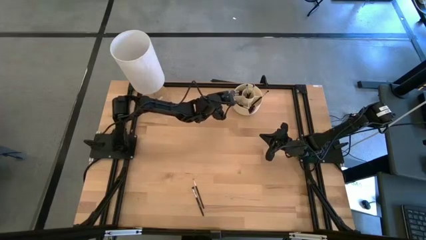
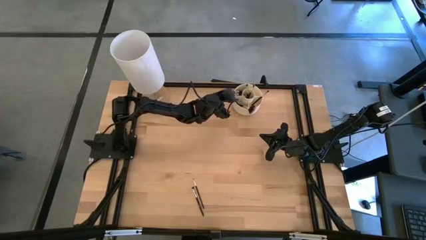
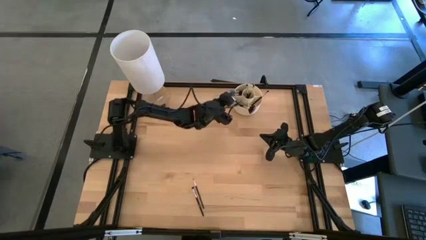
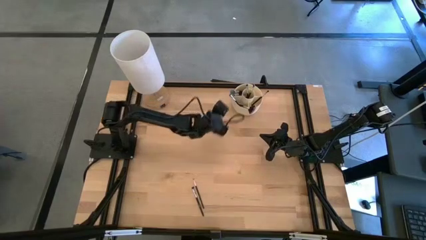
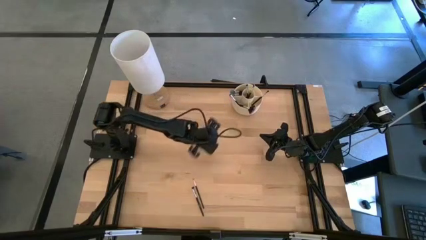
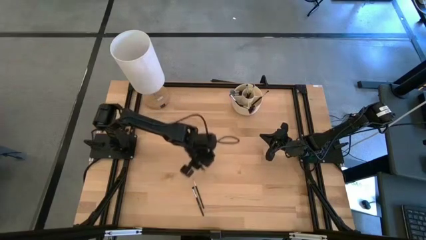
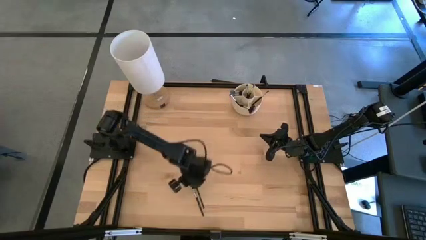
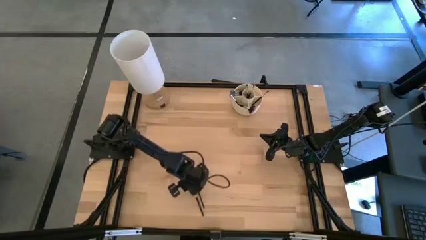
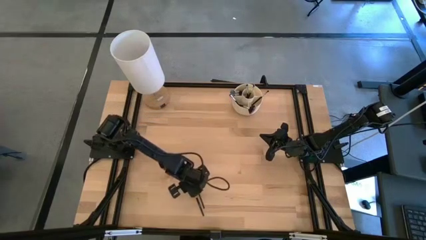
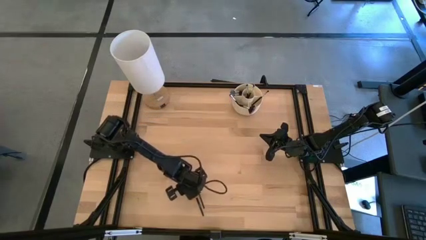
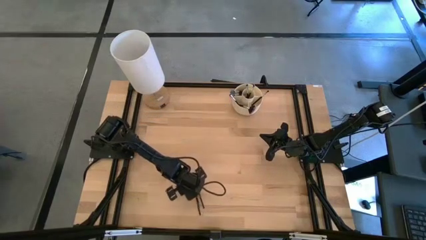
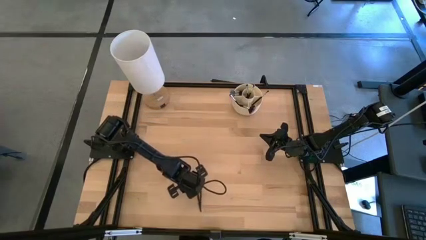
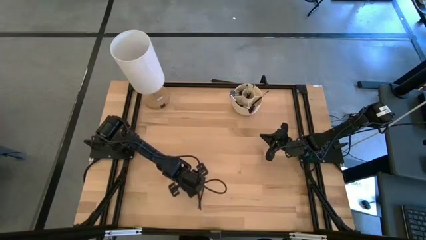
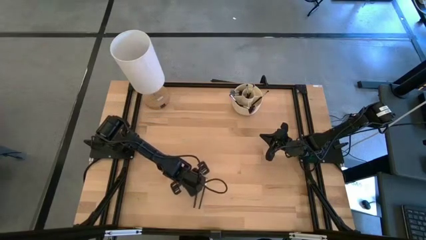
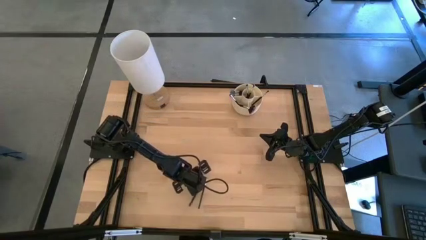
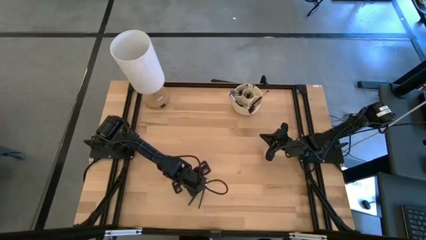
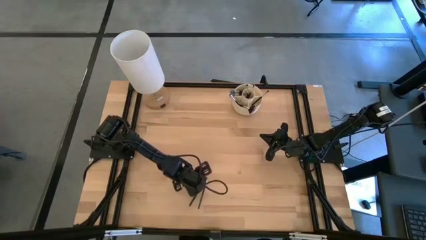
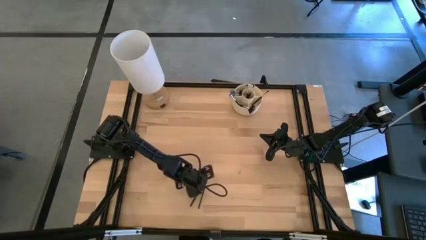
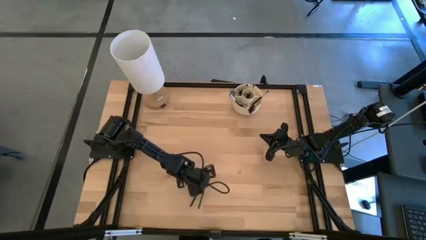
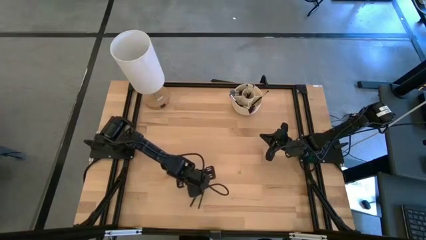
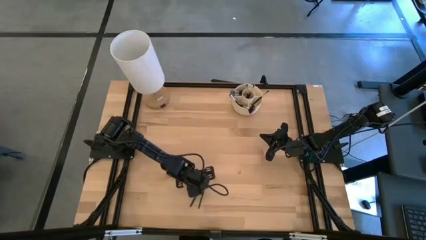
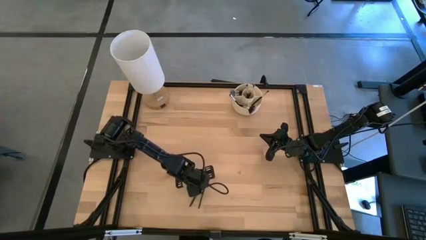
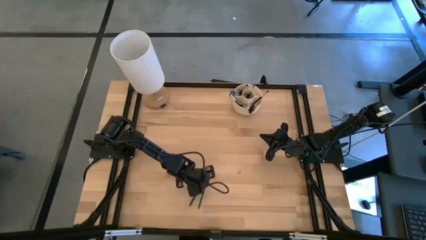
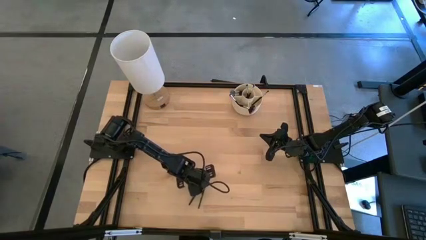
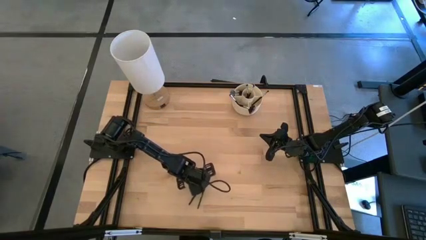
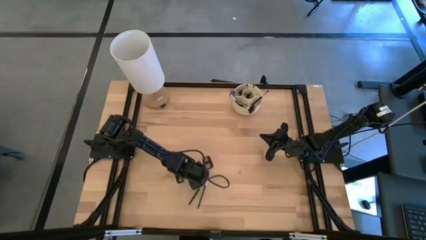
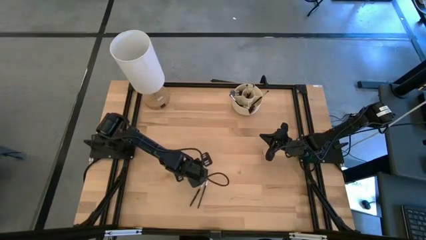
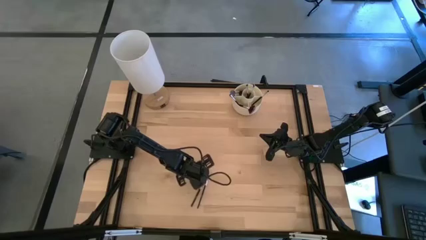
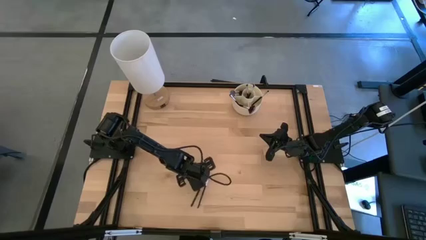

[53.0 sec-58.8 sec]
Task: Sort items
Put the blush brush into the pen organizer

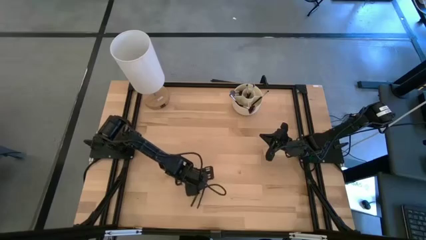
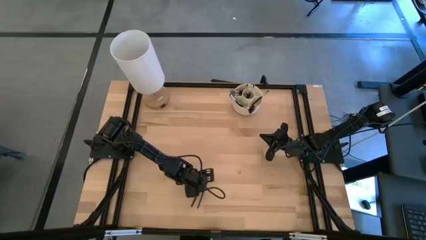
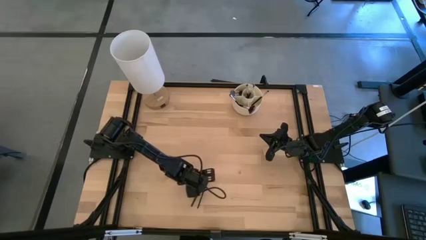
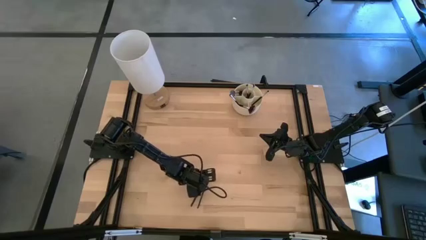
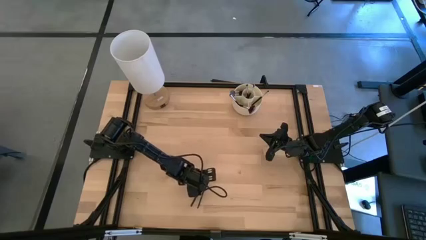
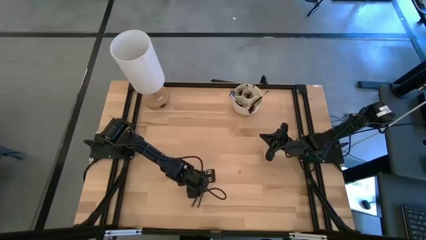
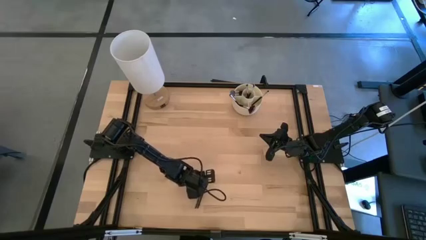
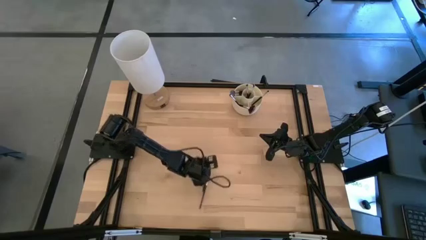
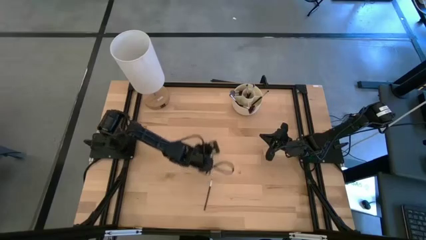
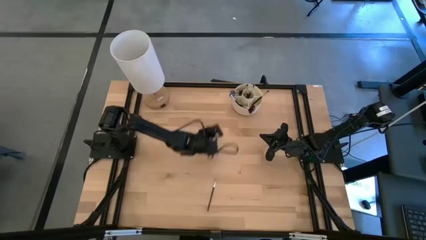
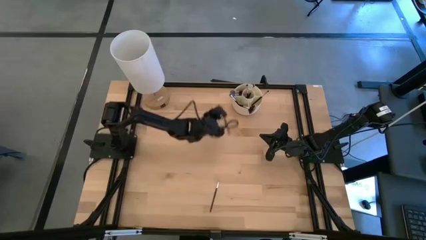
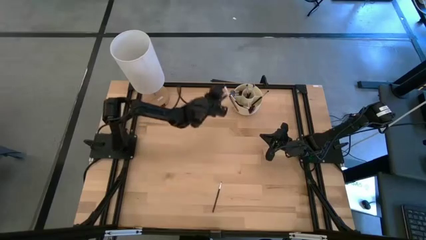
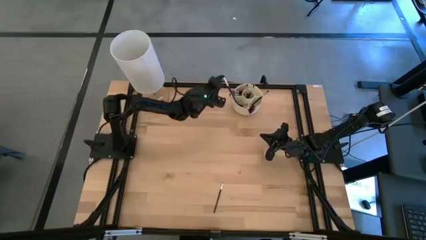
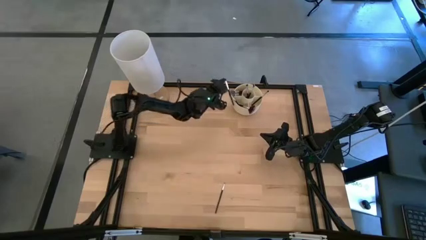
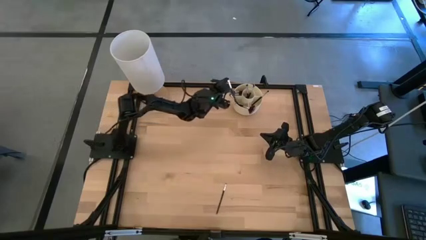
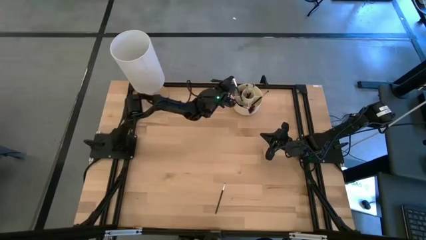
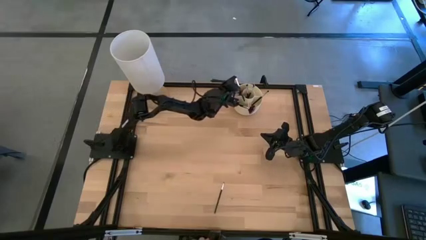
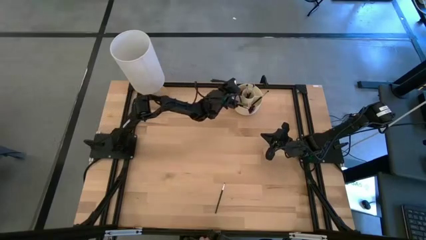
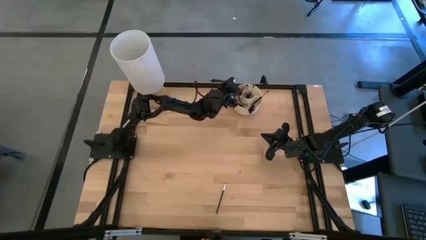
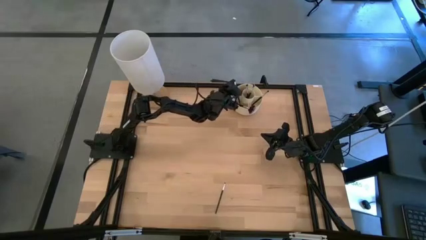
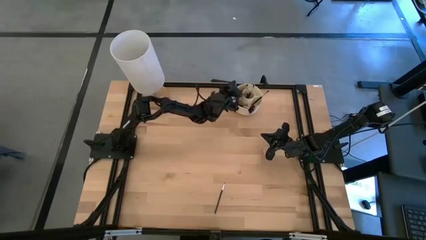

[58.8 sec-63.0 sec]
Put the blush brush into the pen organizer

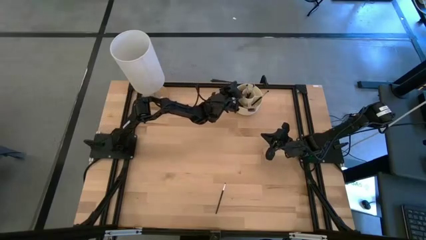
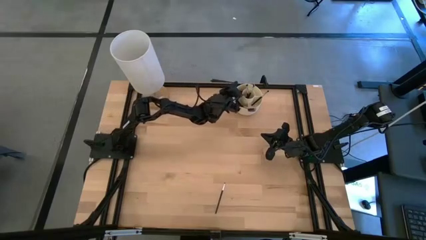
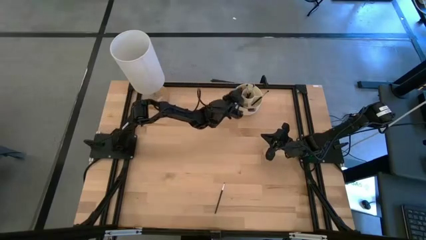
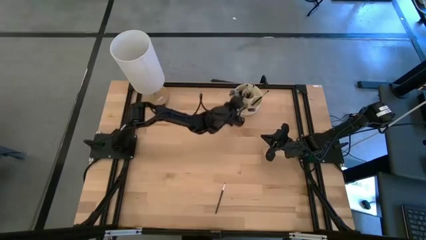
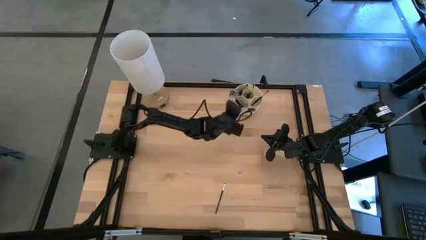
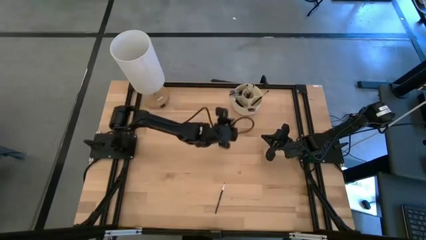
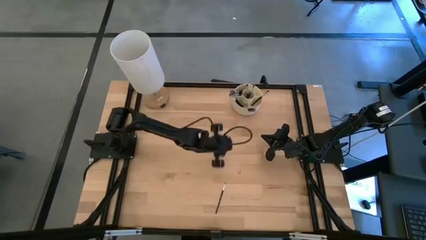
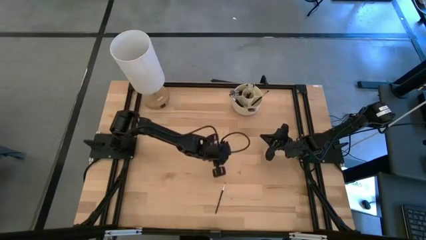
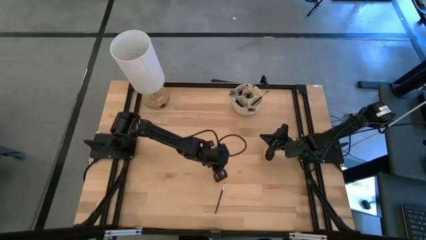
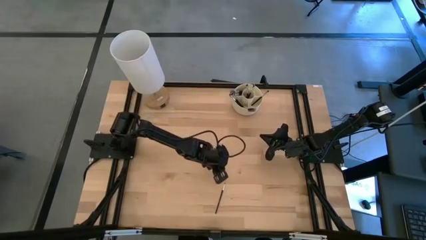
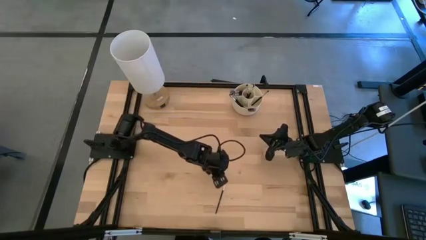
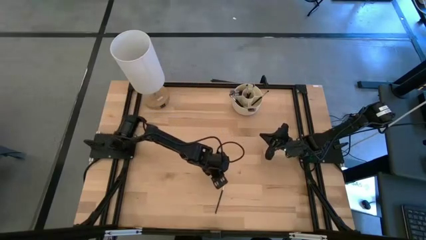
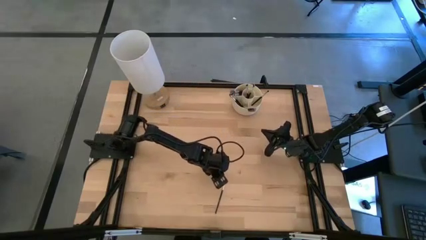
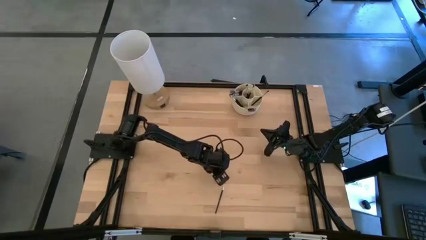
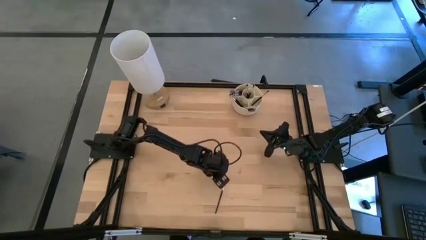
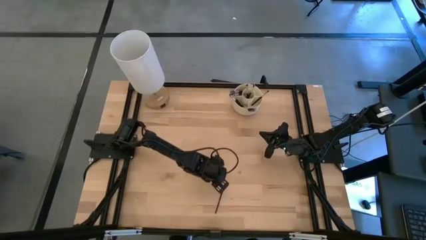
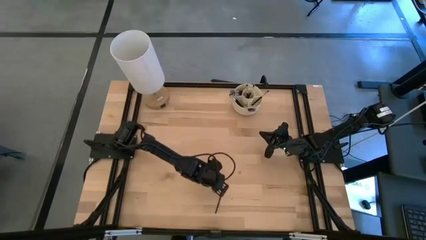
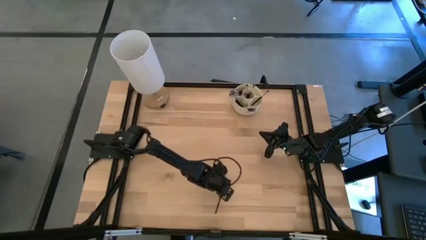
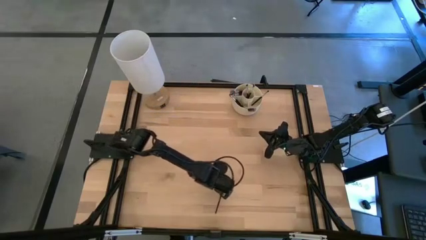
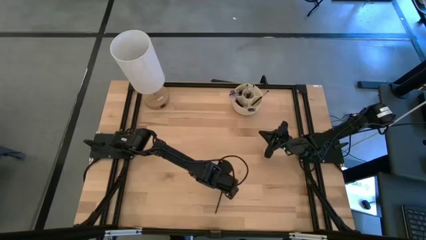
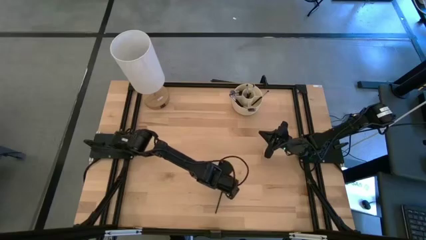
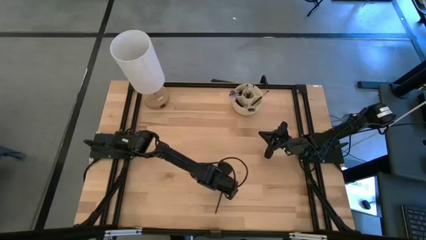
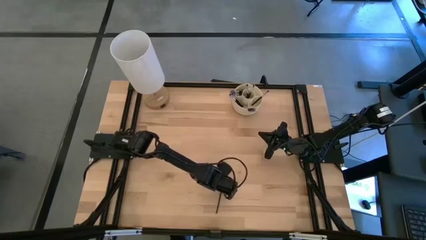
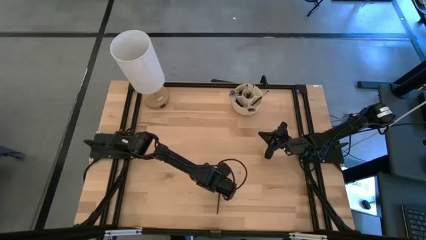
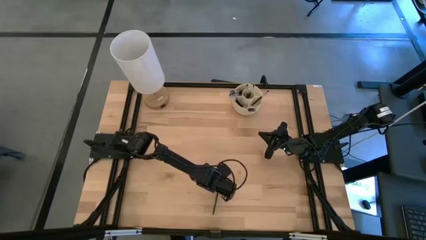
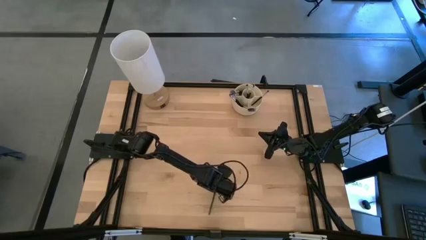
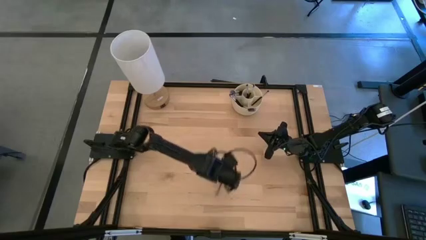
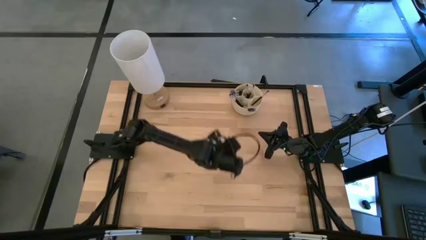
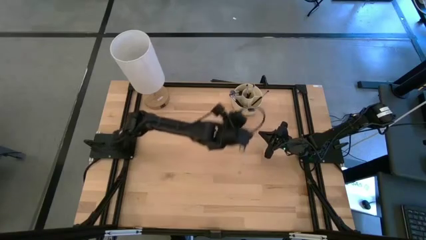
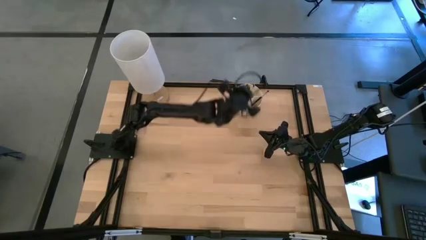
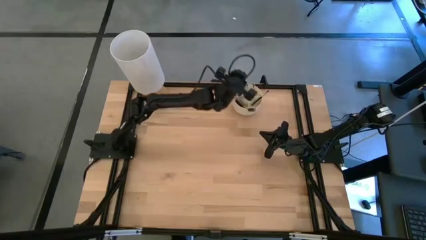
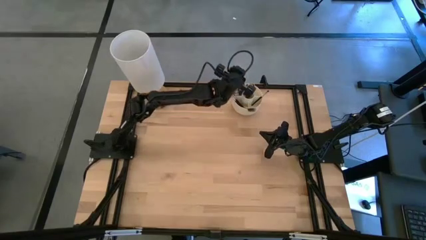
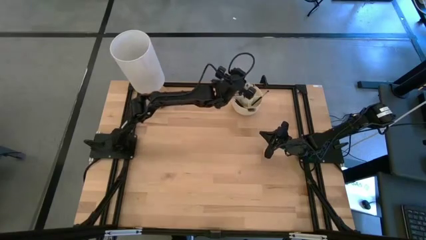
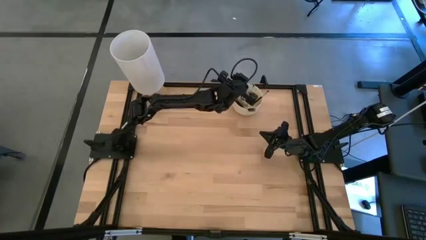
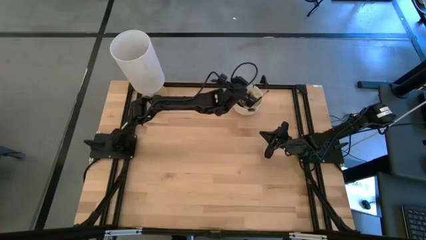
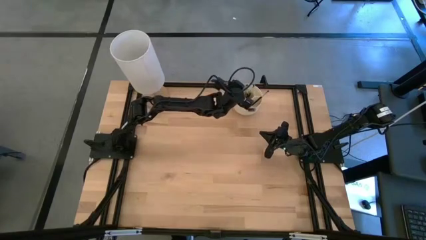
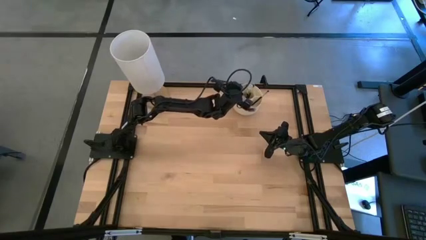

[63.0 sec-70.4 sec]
Put the eyeshadow brush into the pen organizer
